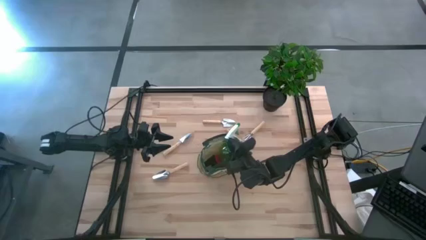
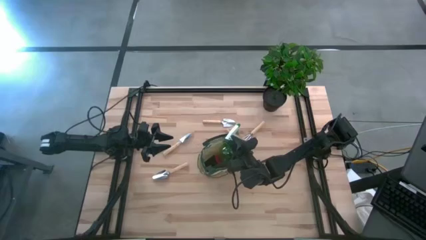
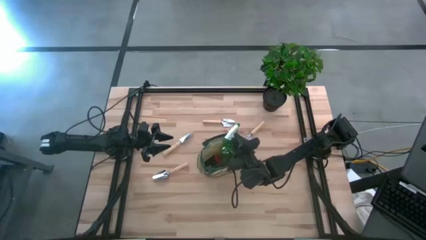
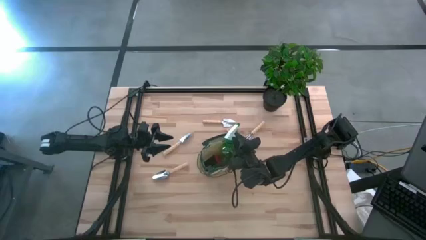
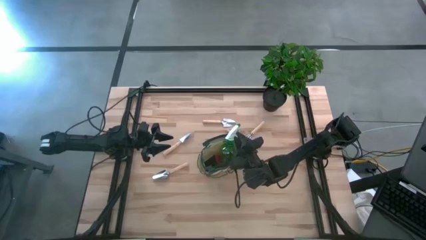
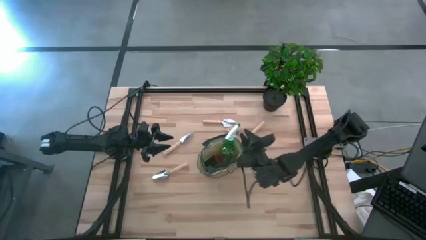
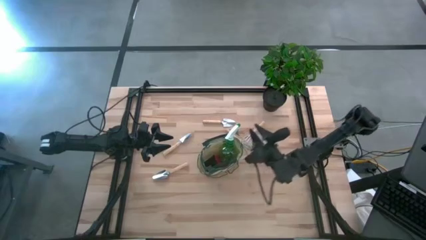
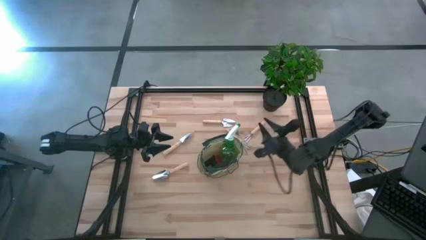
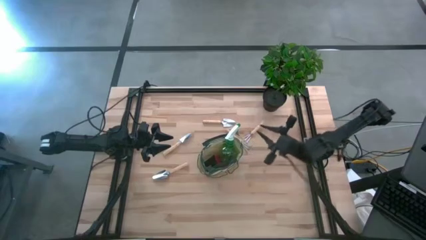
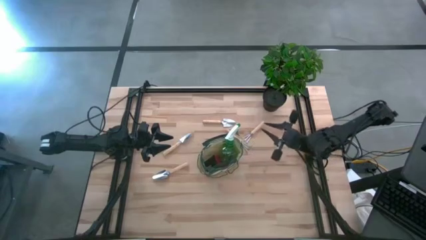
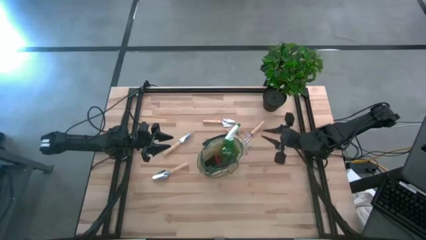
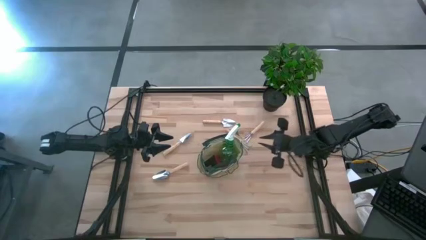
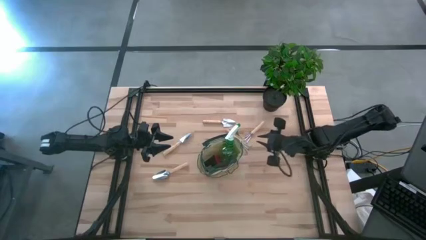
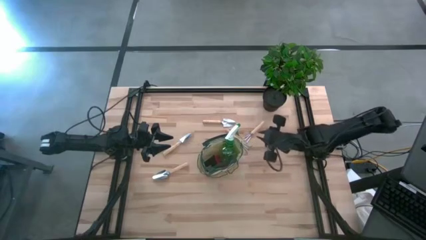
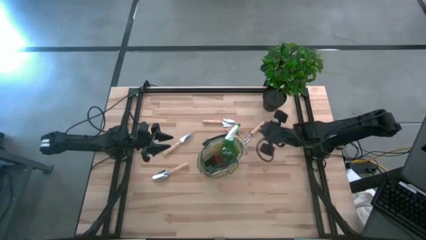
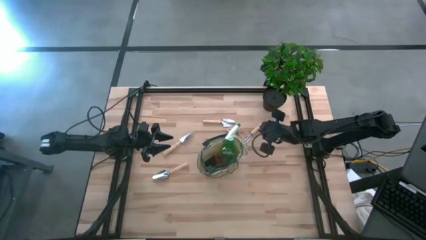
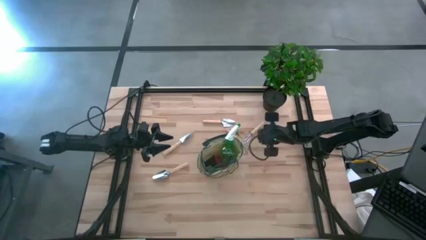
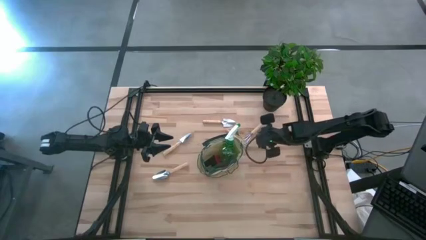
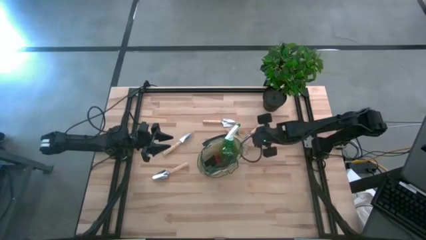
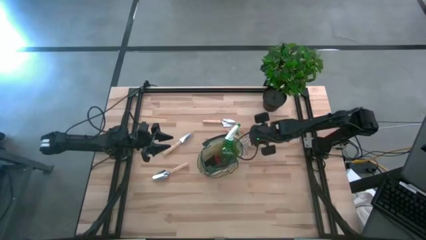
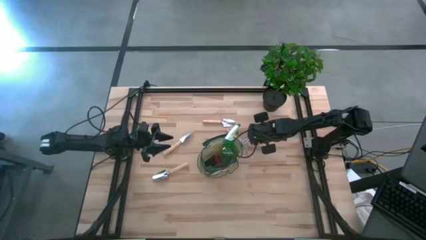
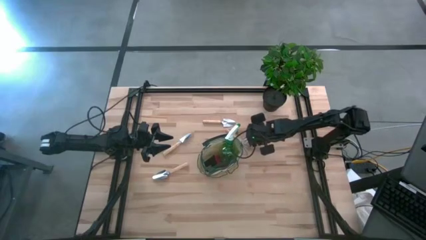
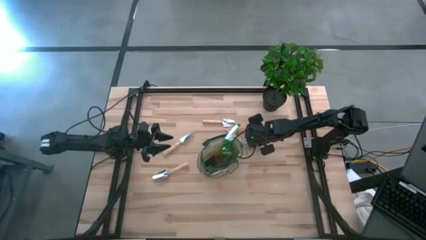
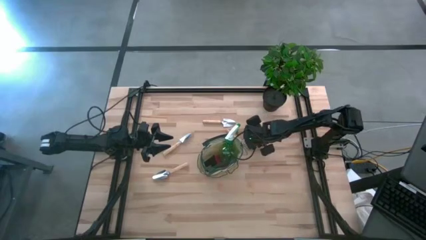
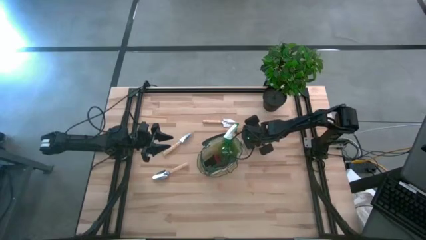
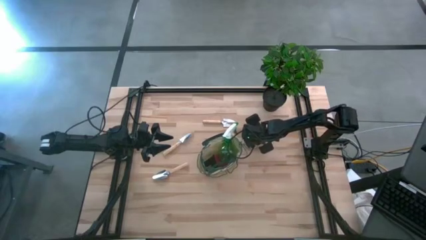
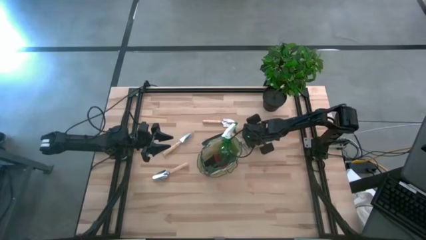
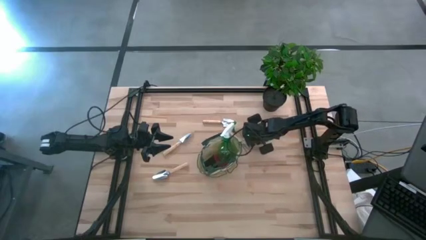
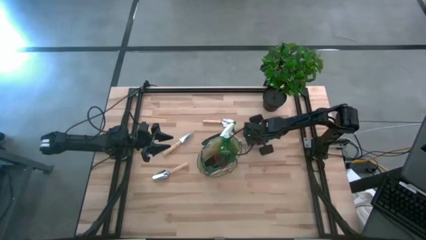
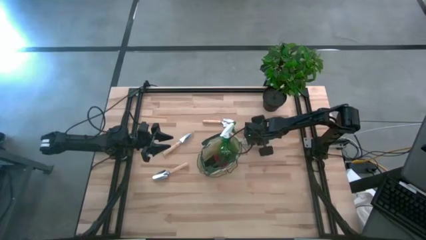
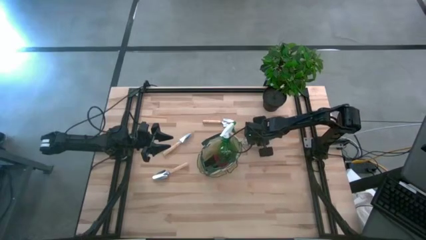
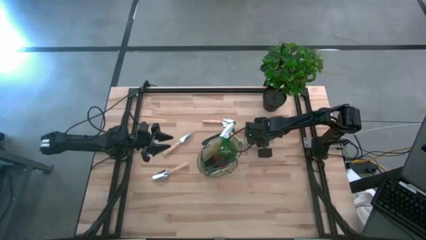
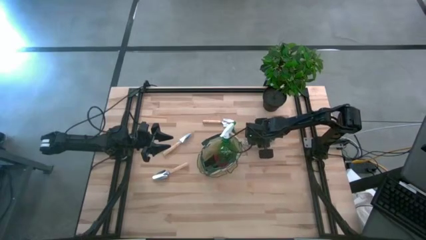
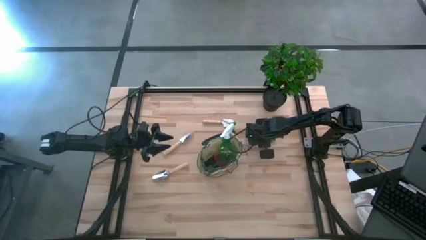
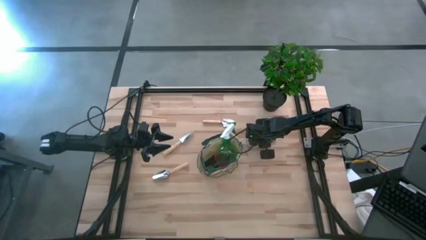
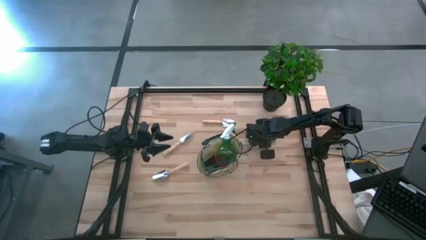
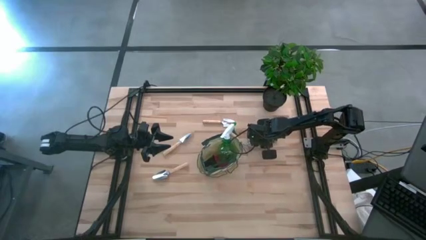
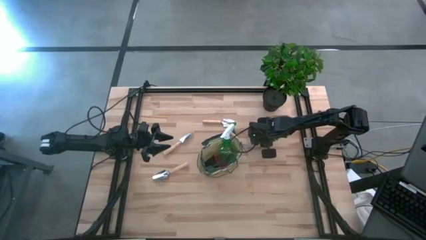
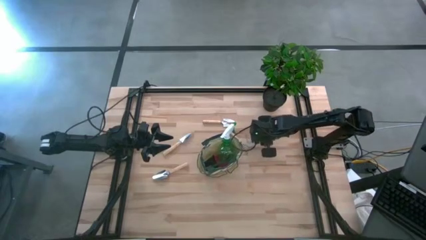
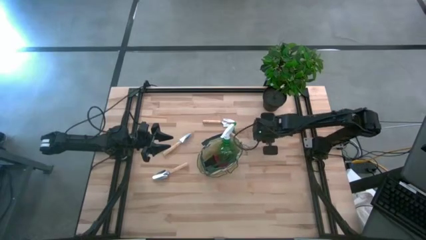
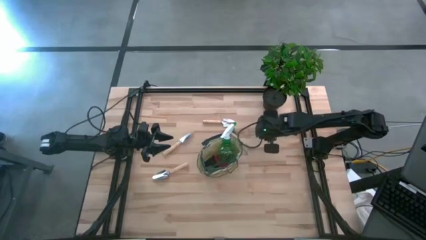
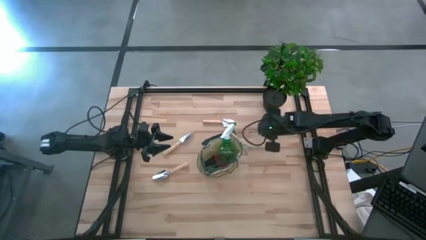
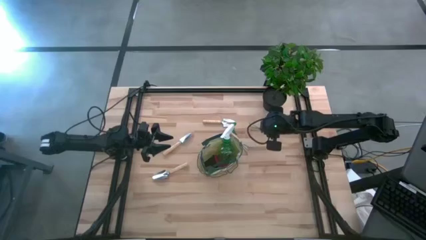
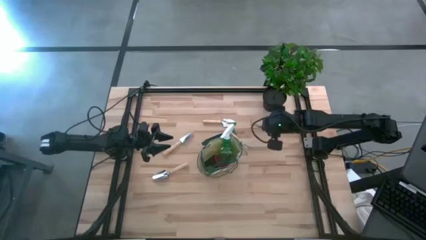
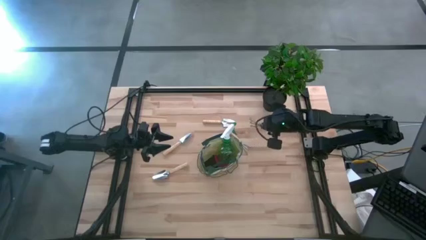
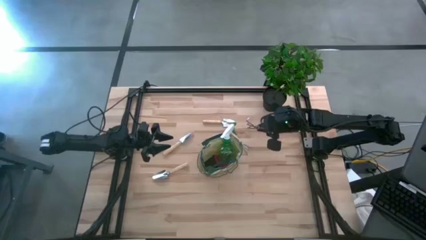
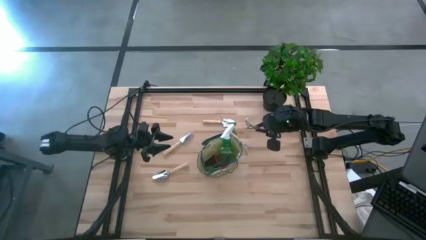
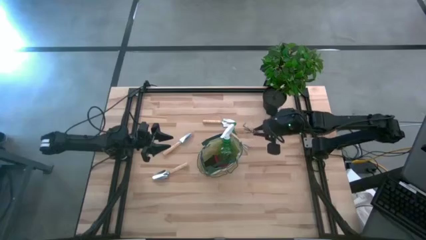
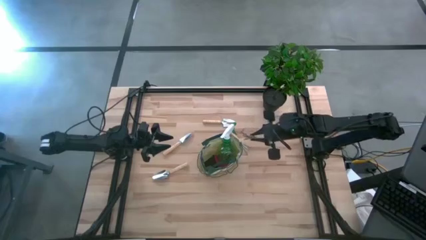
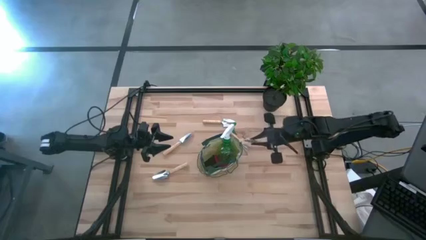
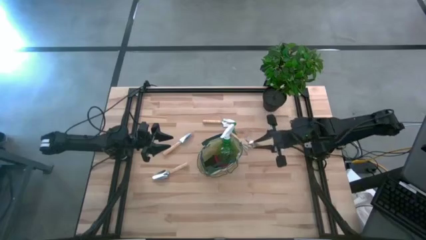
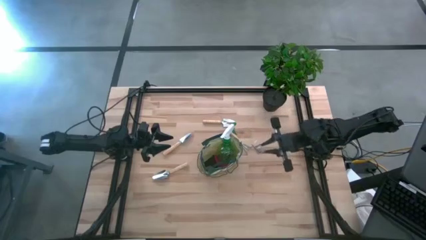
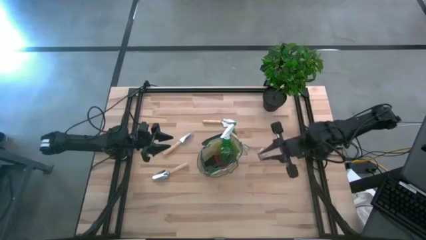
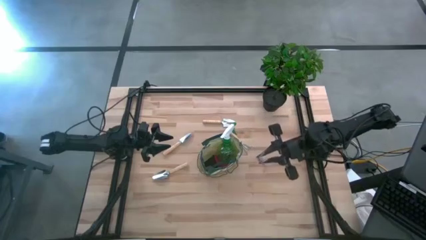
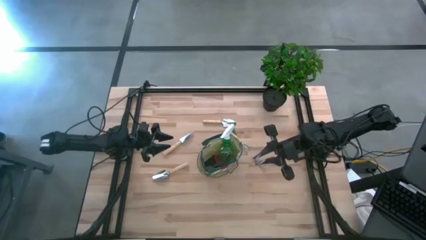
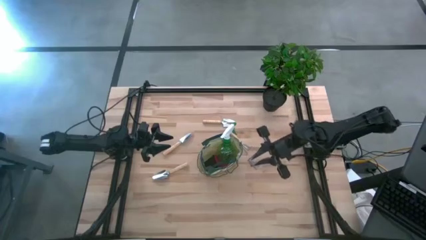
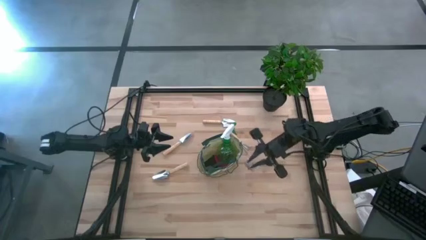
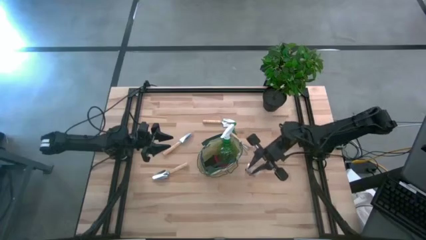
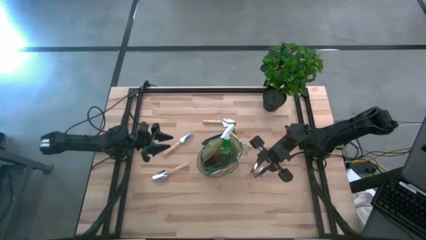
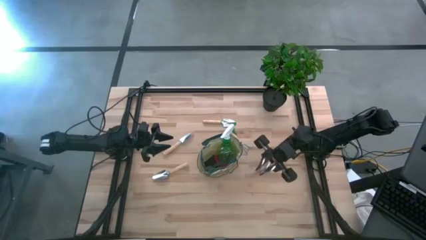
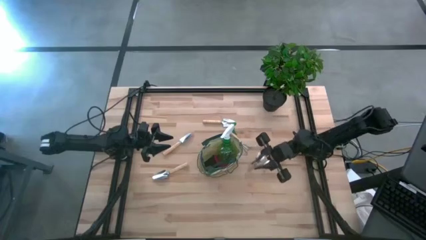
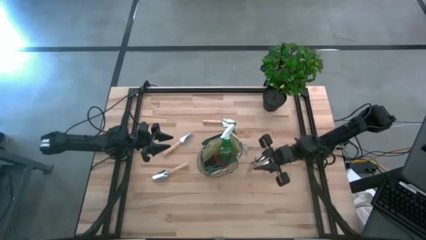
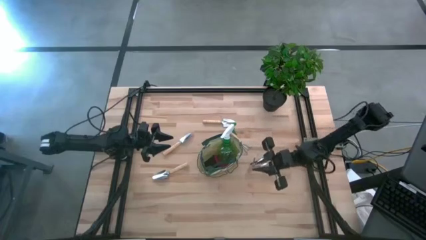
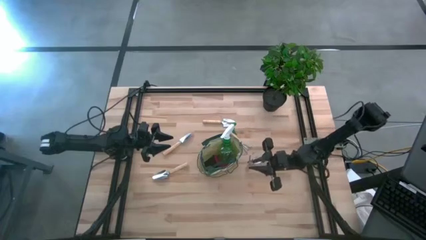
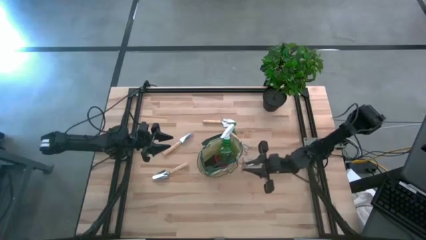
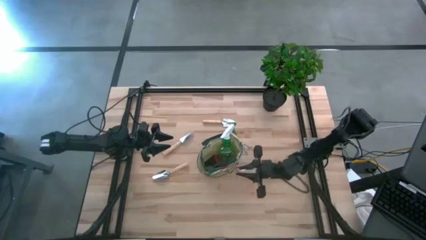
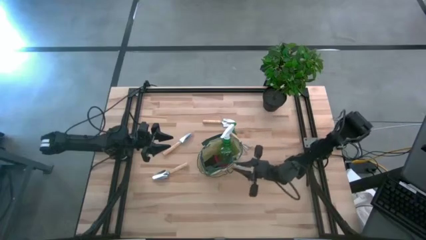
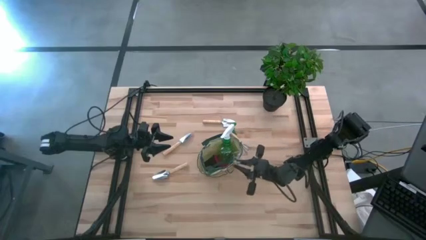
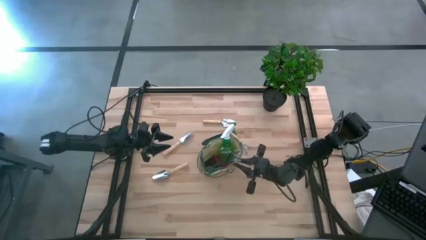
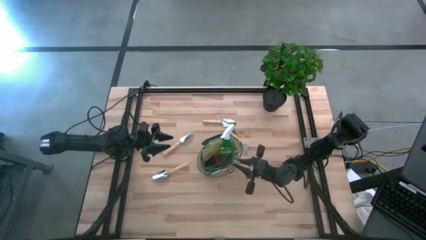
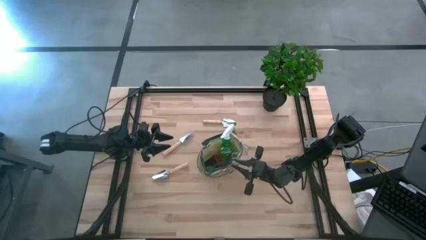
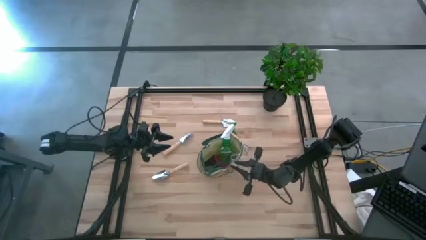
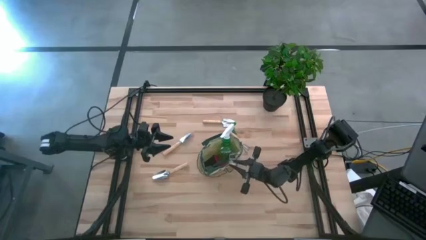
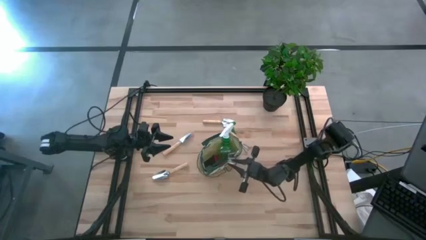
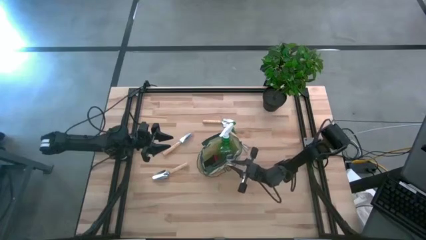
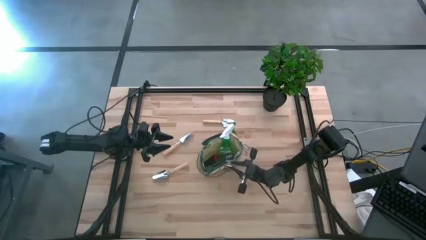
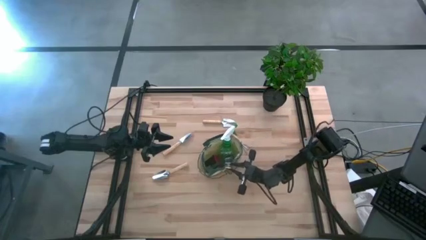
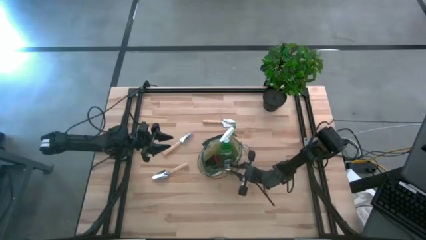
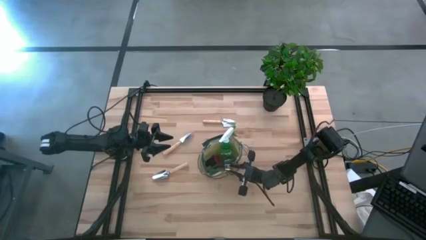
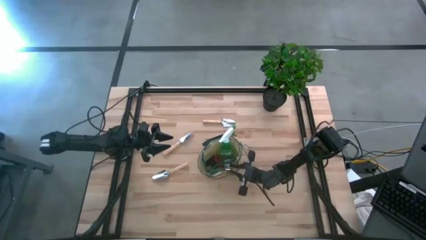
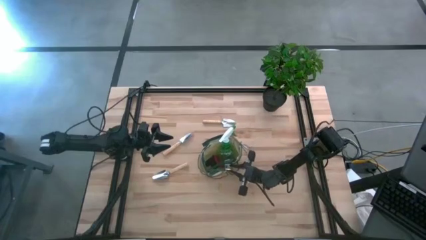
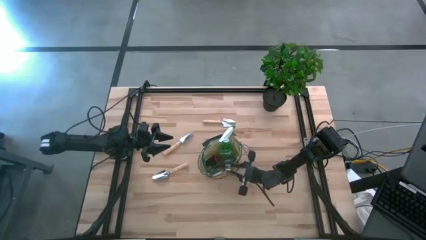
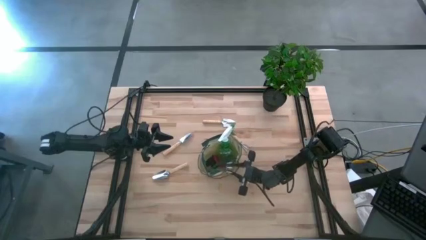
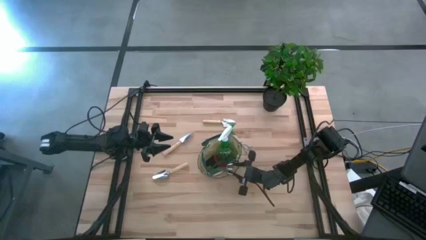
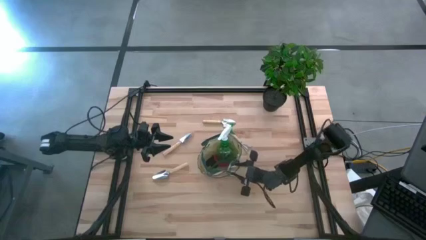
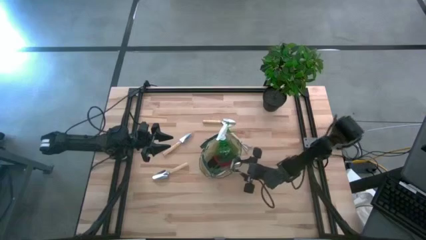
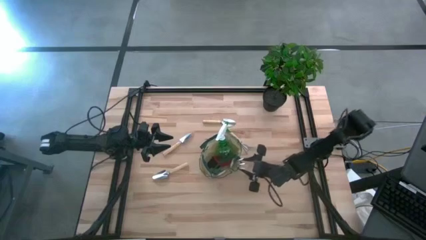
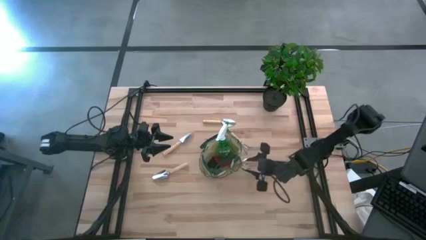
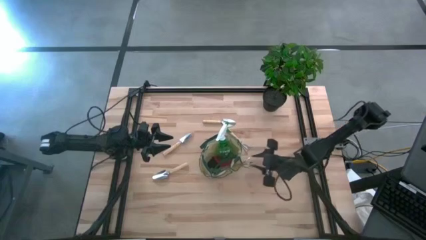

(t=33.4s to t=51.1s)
Task: Pick & Place Garden tools in Gardening bag
Put the right brown hand rake into the green gardening bag
